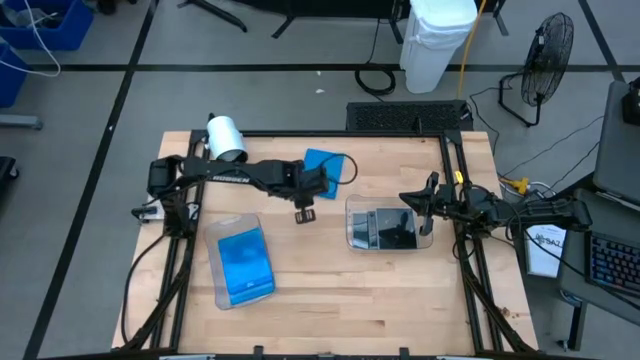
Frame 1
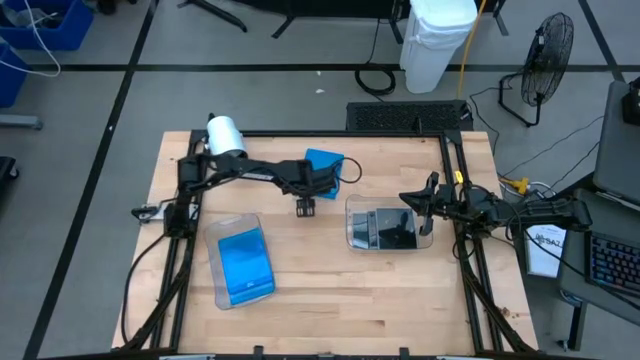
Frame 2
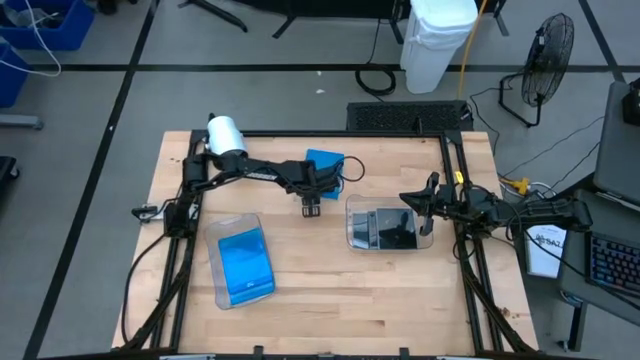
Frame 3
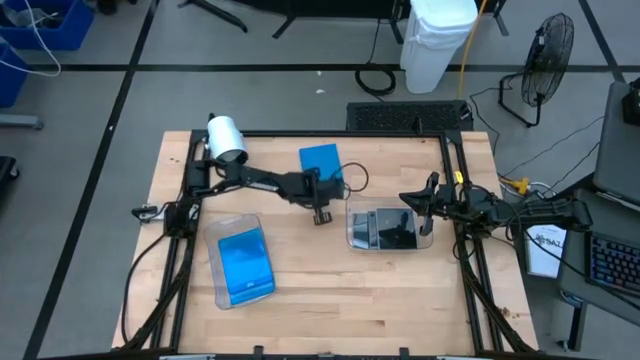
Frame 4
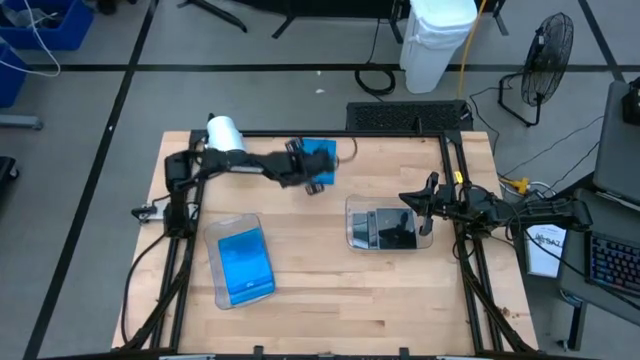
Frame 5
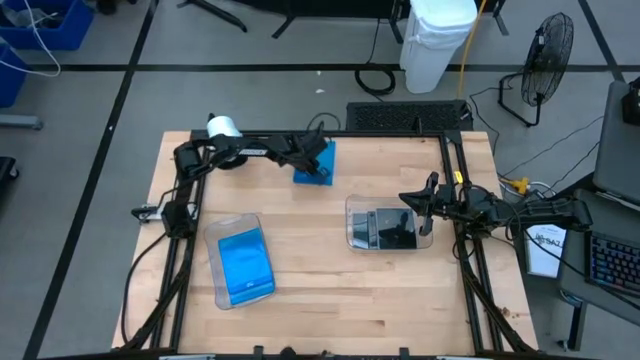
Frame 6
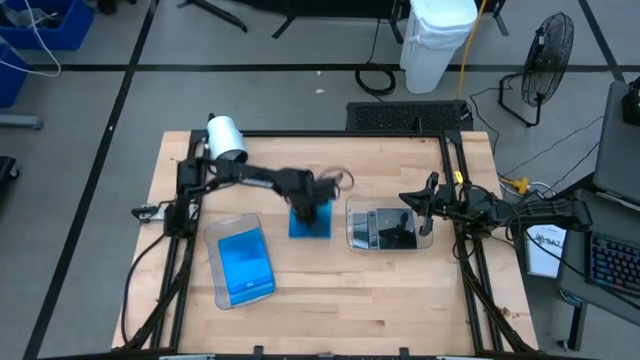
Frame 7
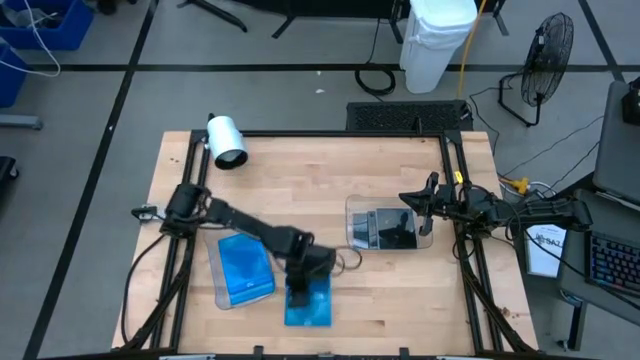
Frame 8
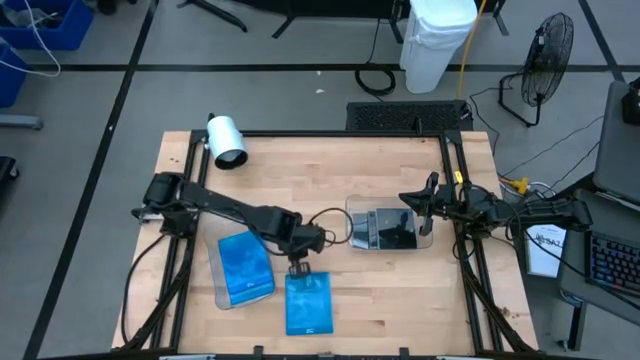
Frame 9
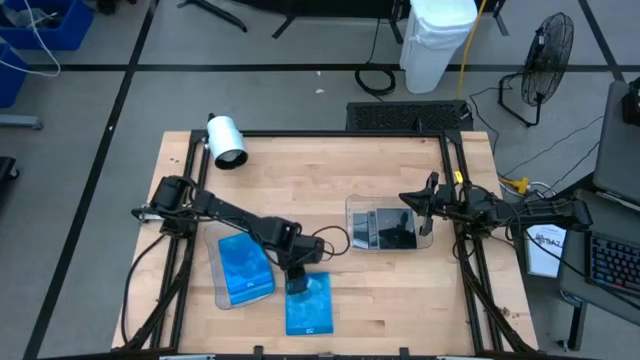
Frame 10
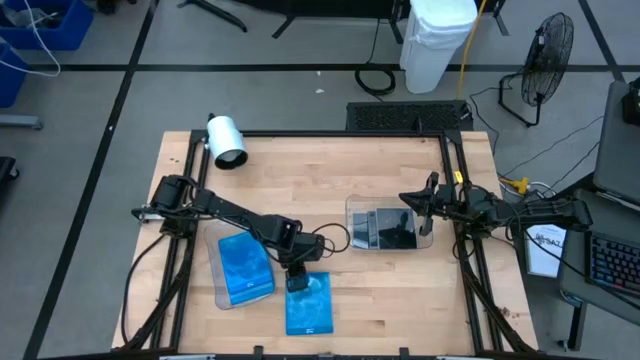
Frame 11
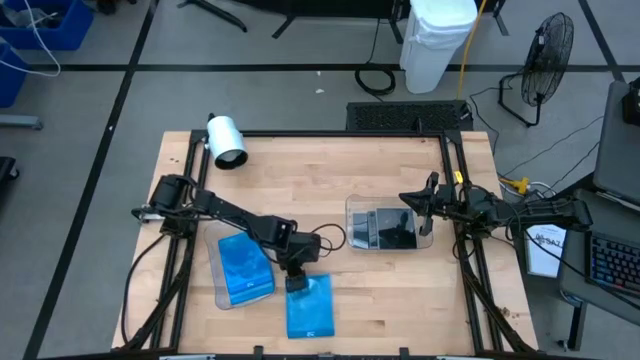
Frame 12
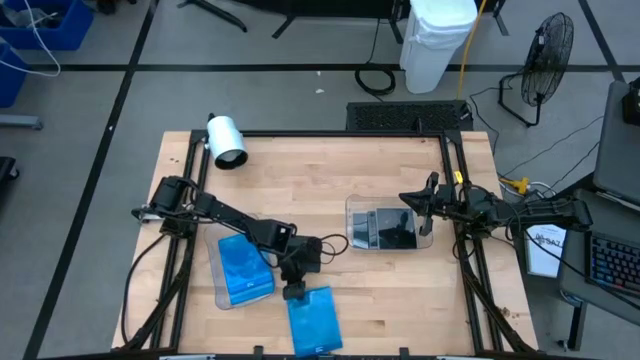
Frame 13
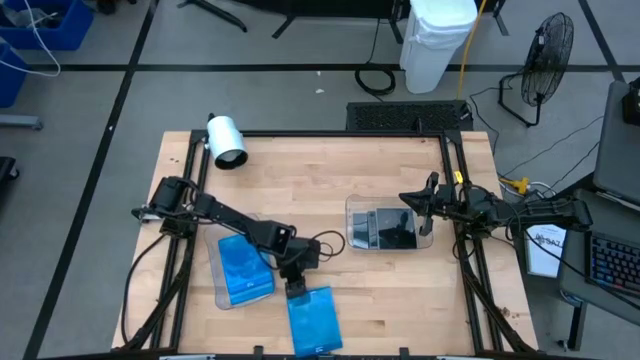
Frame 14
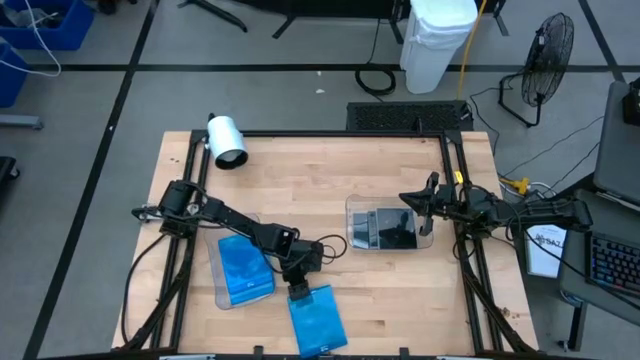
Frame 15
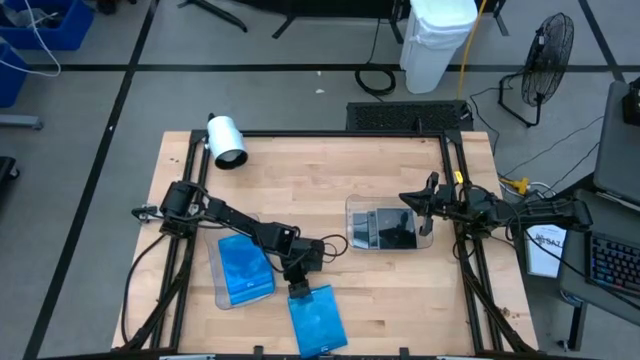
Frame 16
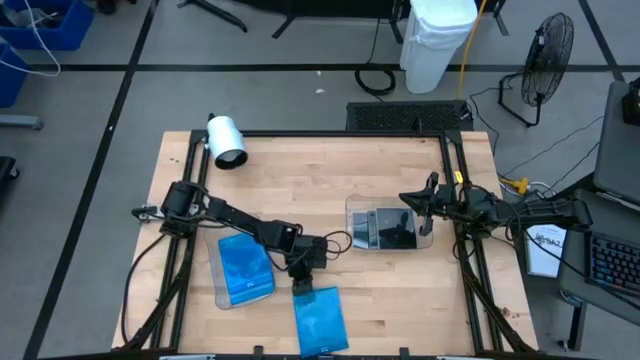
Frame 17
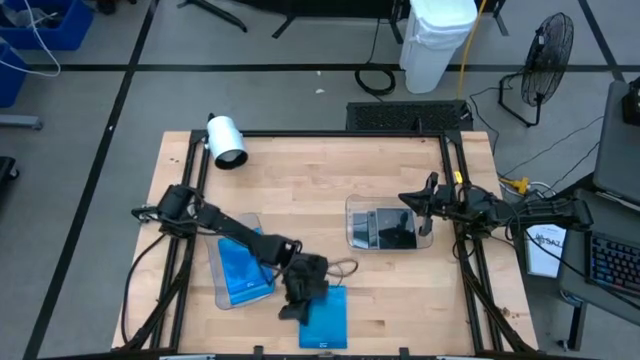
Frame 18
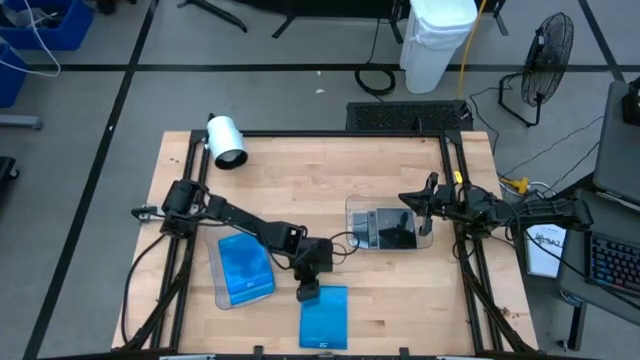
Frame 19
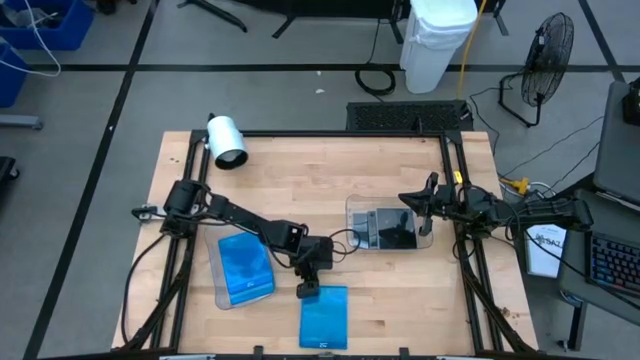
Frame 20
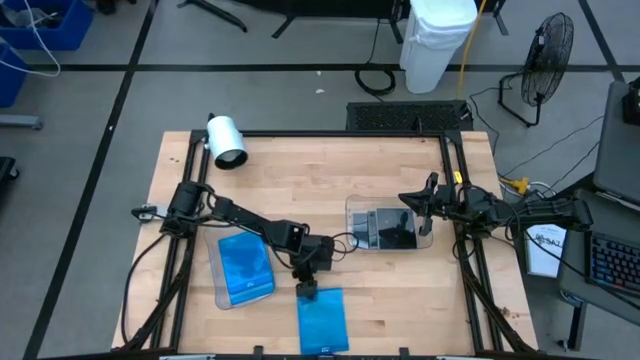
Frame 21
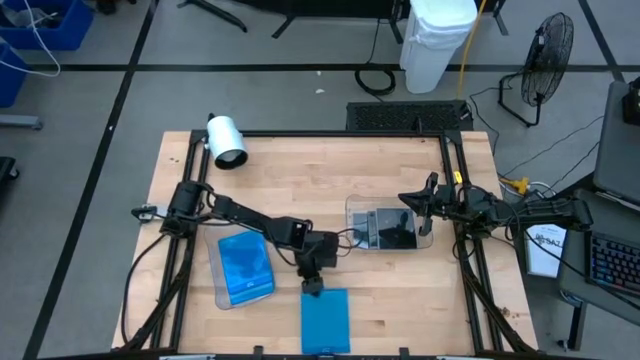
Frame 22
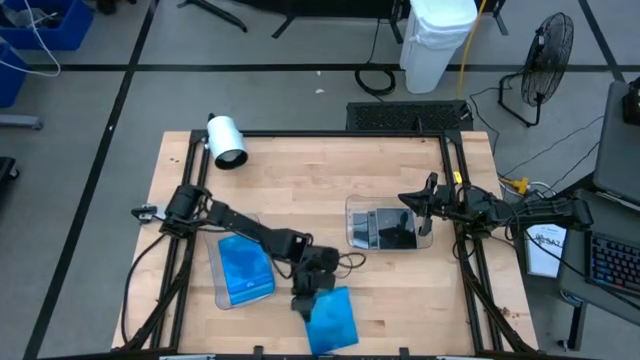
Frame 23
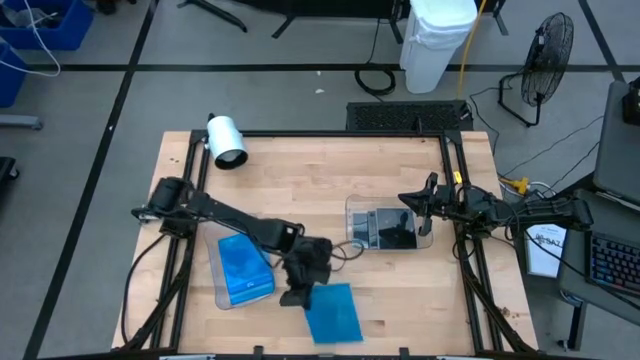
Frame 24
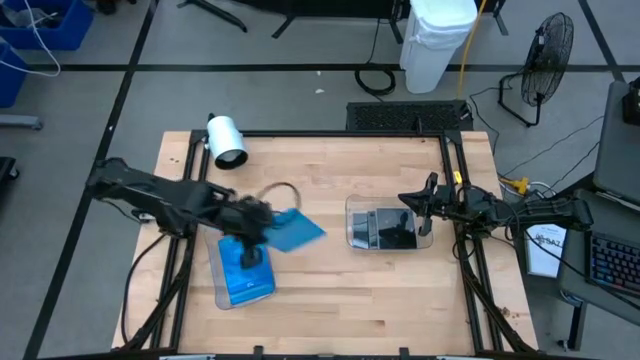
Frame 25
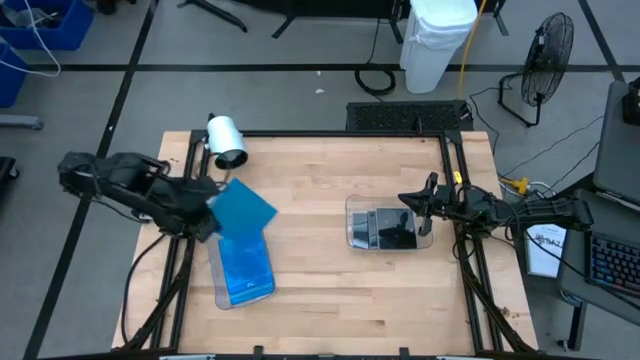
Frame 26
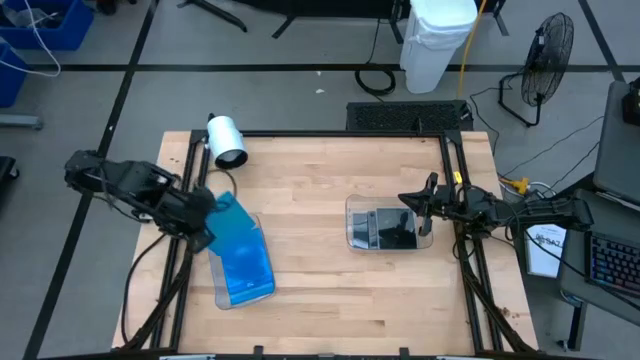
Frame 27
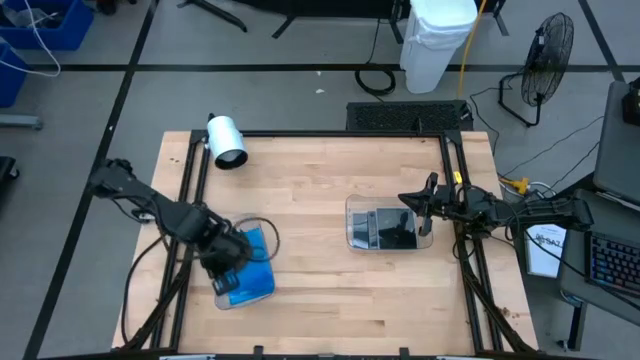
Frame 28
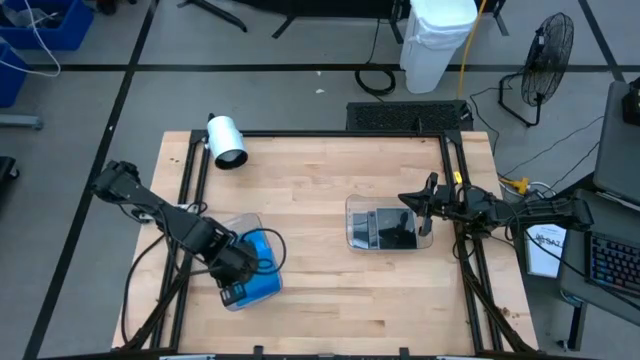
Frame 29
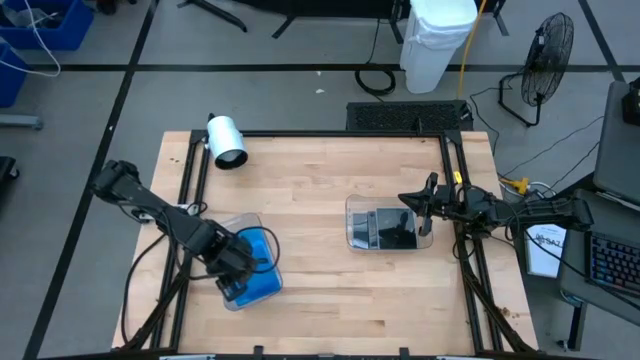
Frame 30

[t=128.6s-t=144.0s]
Task: Pick & place jewel cases by type
Put the blue CD case into the left transparent bin

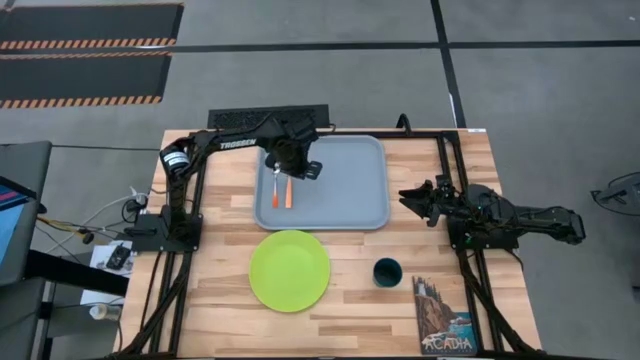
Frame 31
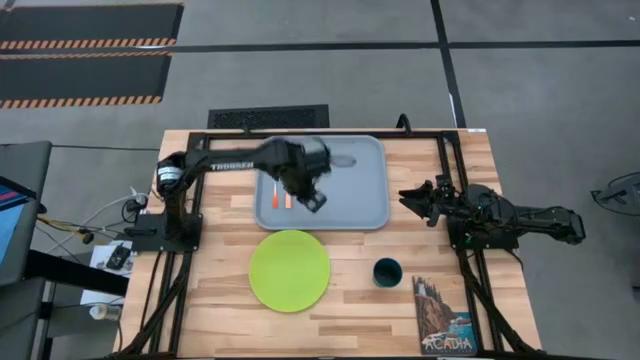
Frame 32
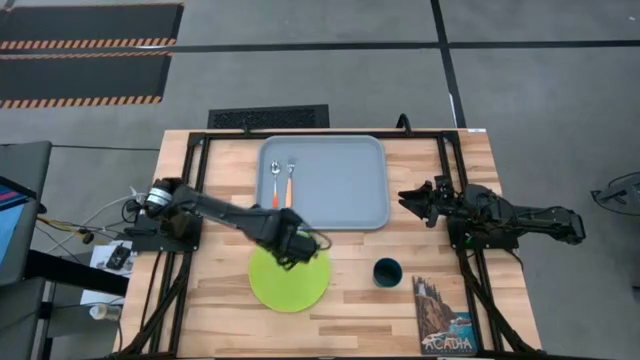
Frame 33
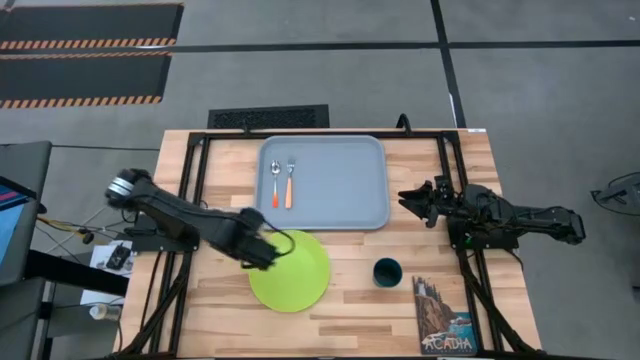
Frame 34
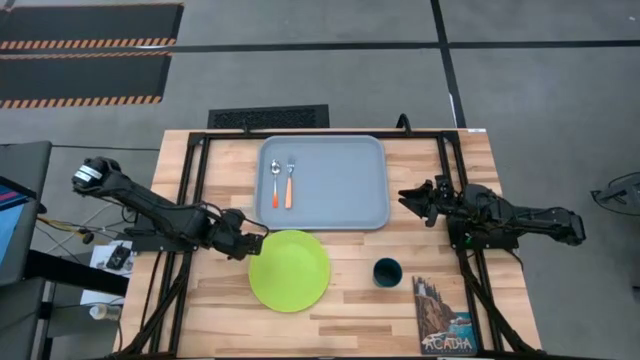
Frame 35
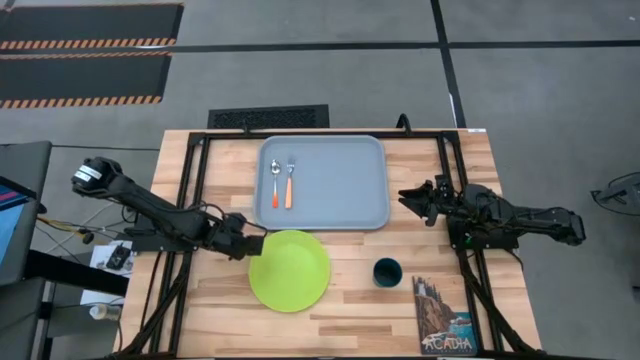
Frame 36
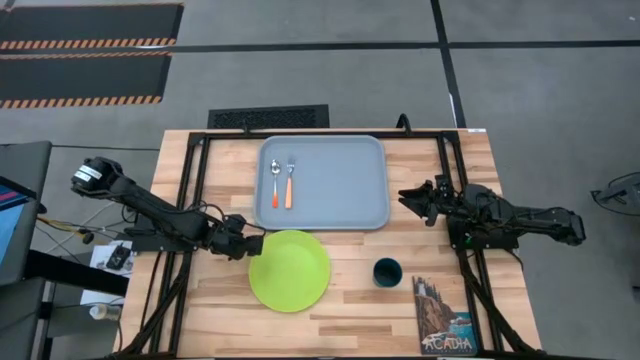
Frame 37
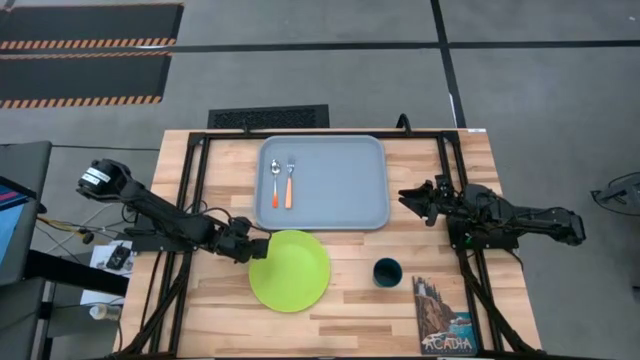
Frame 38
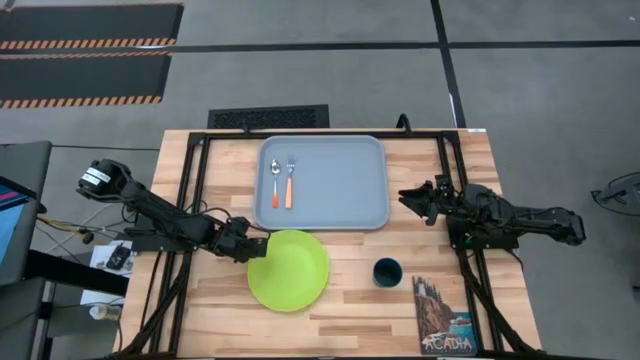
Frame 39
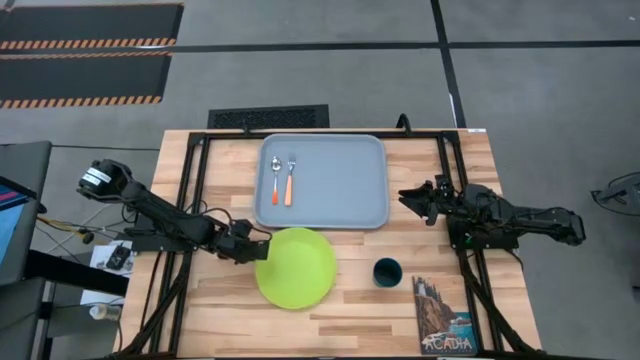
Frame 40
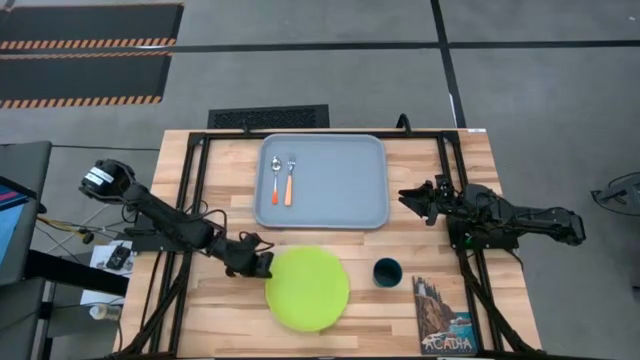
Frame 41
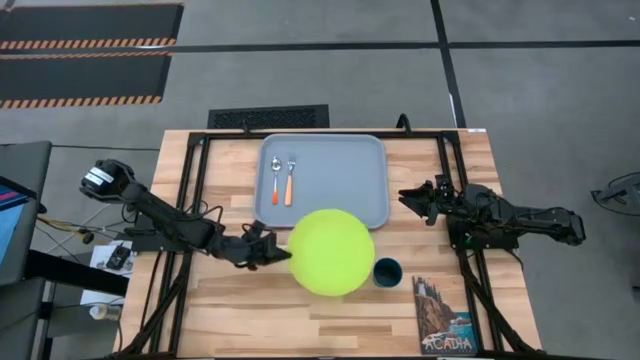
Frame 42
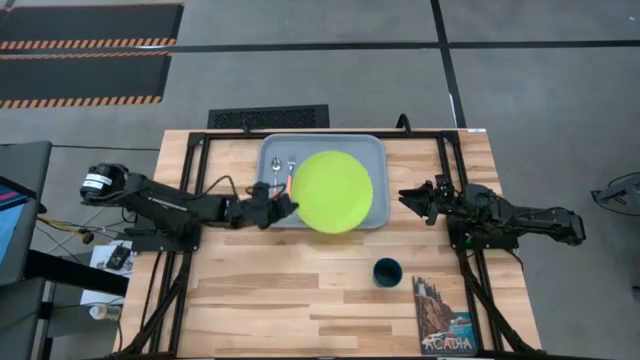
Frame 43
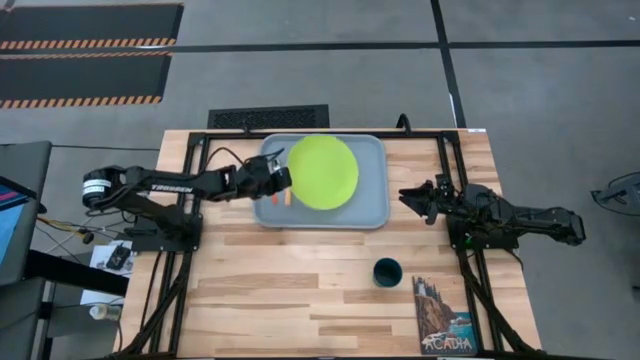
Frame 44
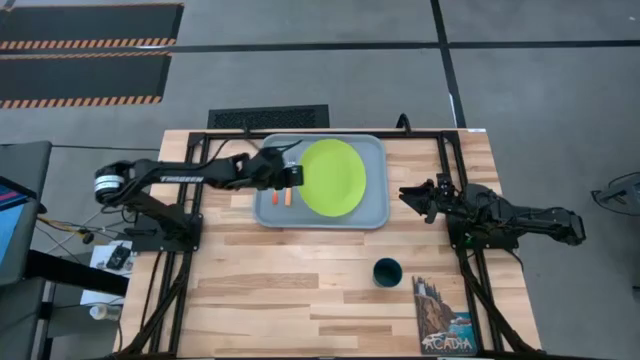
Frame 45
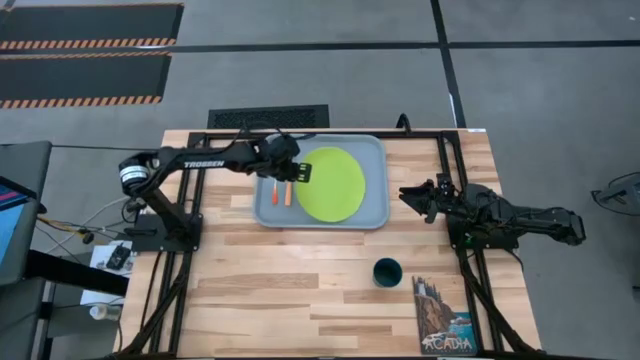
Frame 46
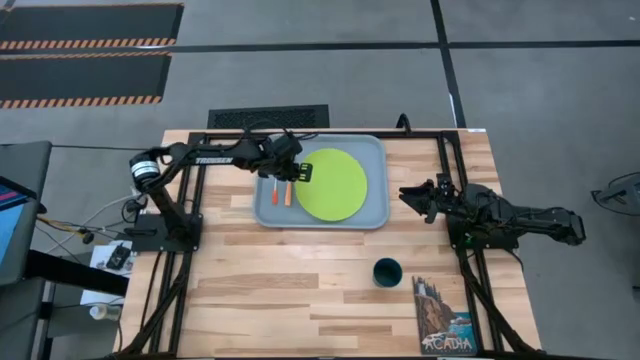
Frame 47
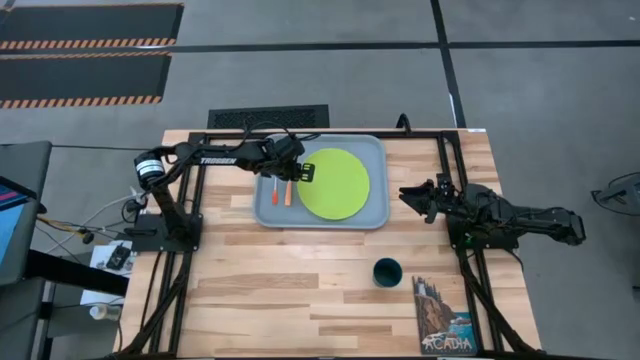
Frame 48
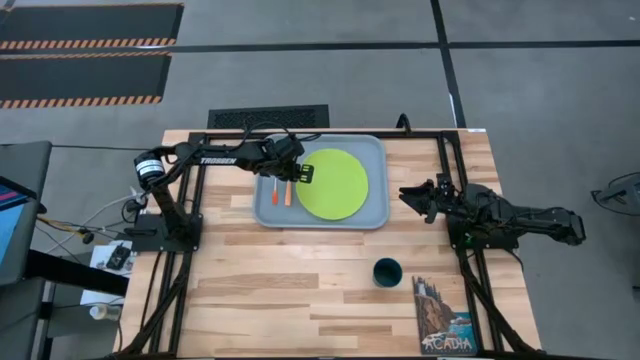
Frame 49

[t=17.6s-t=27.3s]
Task: Pick and place plate/cup/fork/spoon on tray
Put the green plate on the gray tray to the right of the orange fork
